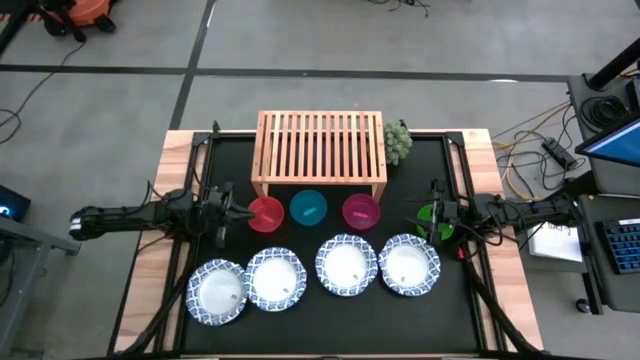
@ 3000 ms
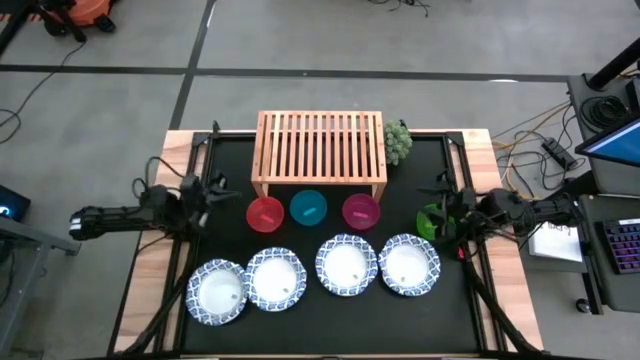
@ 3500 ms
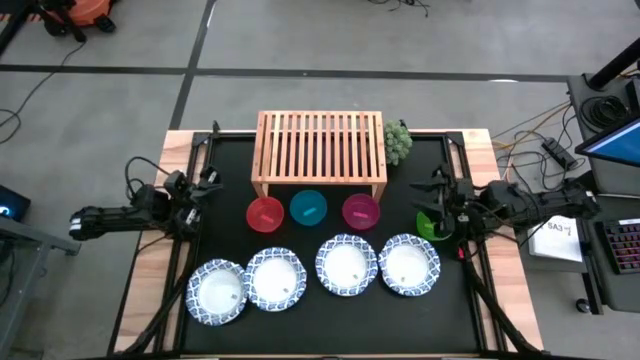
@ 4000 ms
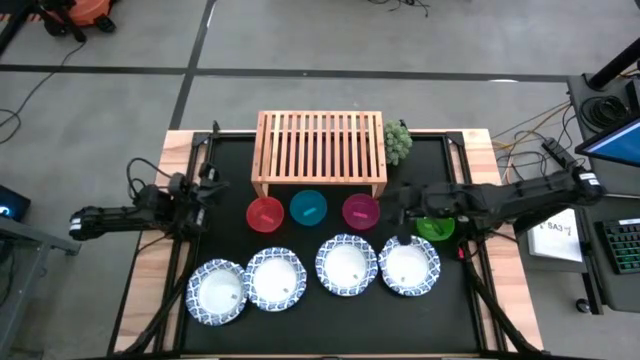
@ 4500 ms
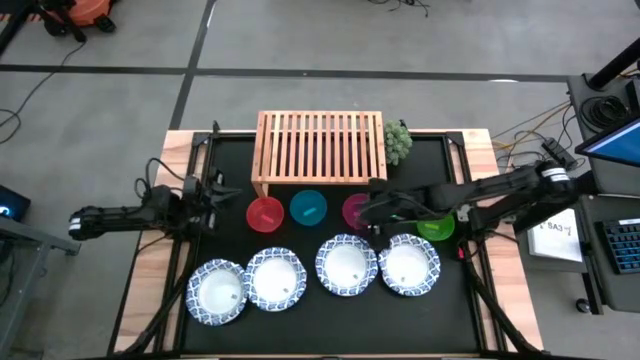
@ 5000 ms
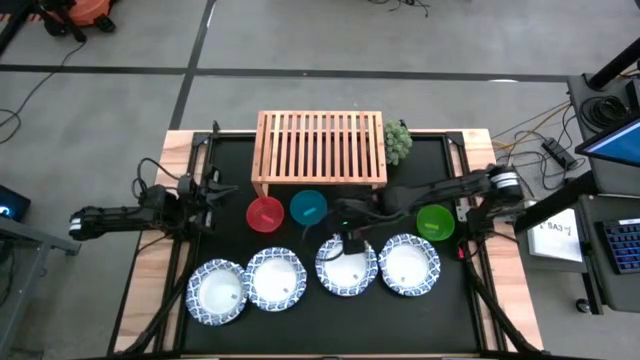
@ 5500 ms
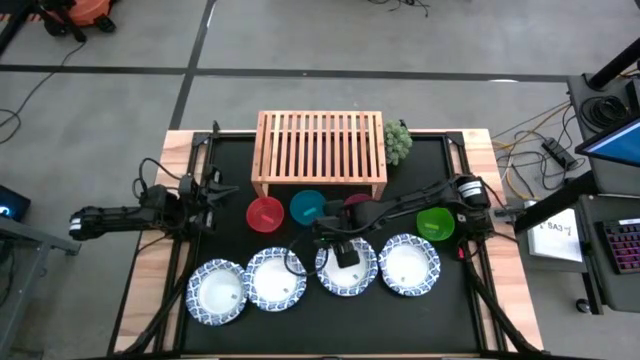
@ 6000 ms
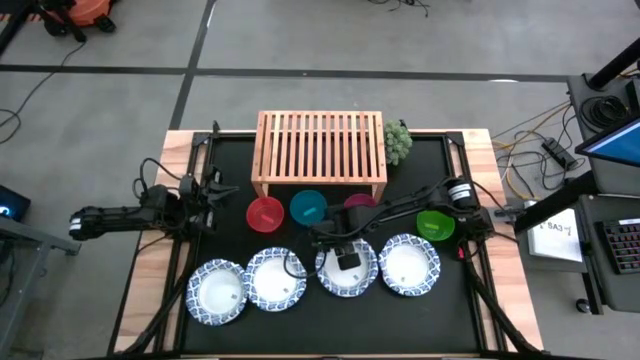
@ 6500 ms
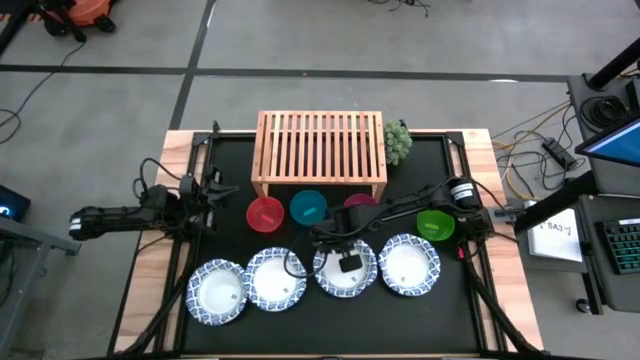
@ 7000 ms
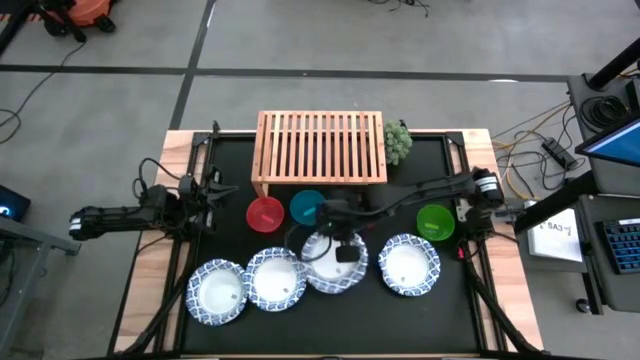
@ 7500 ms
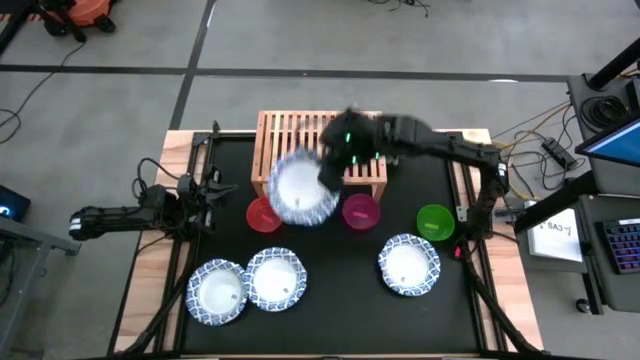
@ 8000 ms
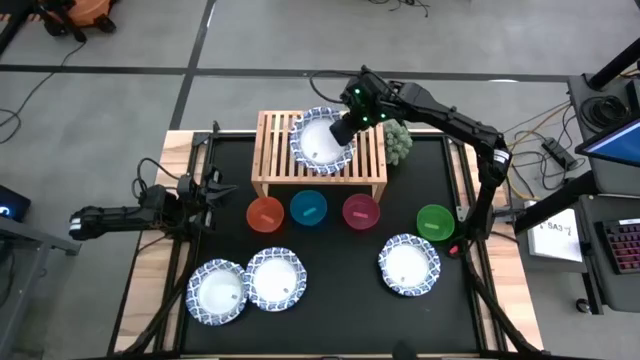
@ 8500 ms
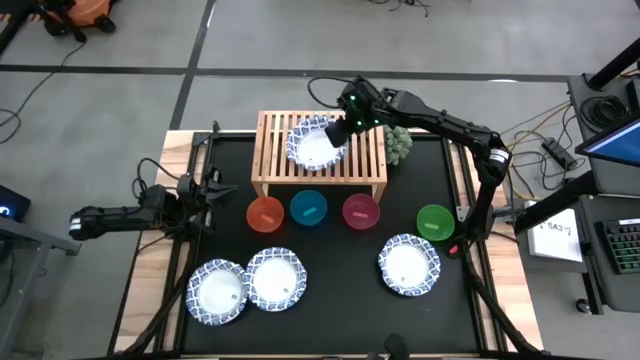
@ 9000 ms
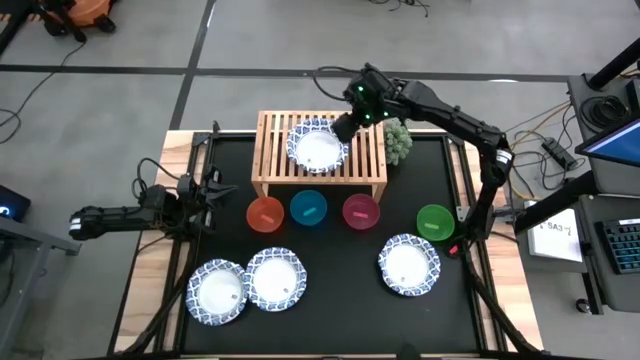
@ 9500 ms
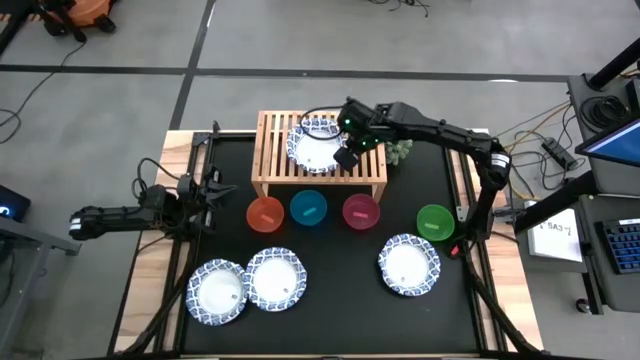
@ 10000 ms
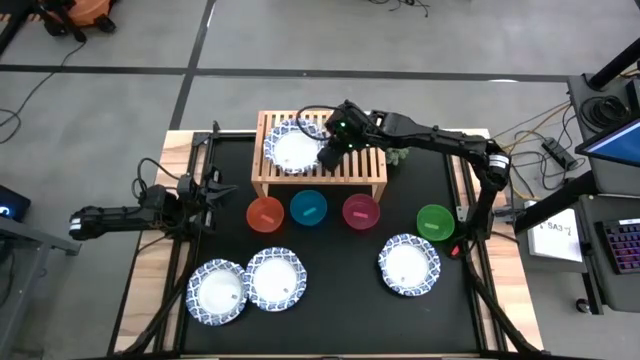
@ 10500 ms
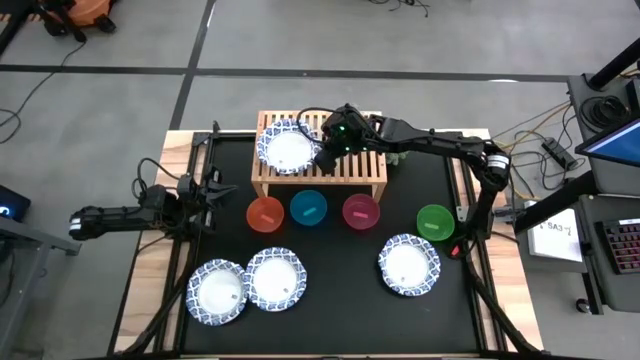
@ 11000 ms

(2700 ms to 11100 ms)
Task: Place and stack bowls onto a shelf
Put the white bowl on the shelf

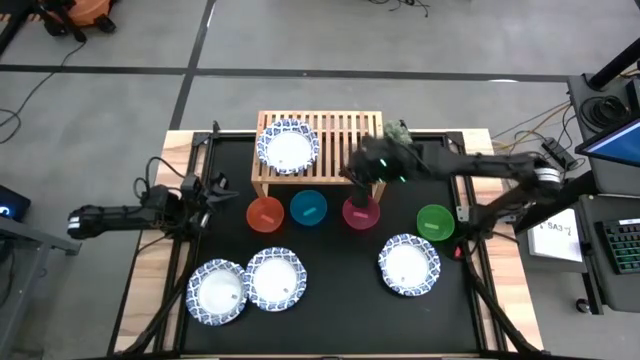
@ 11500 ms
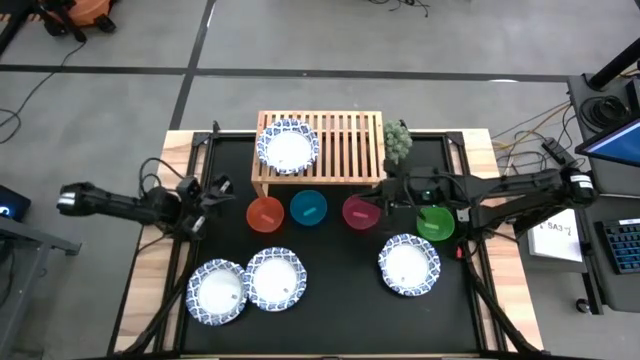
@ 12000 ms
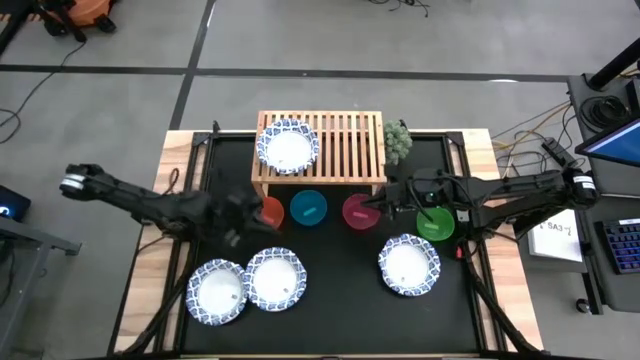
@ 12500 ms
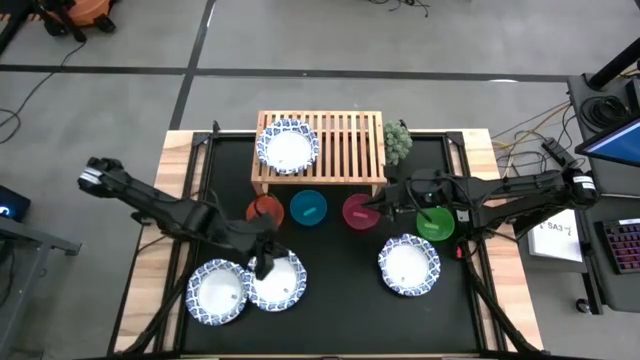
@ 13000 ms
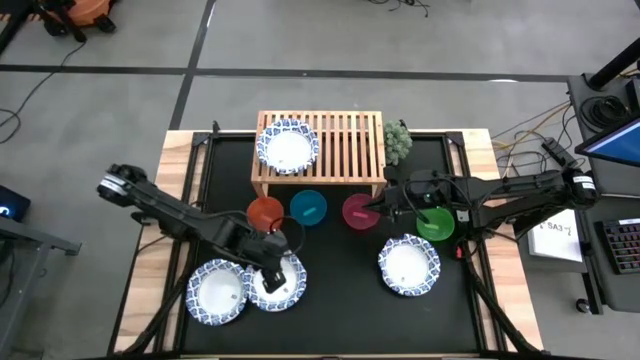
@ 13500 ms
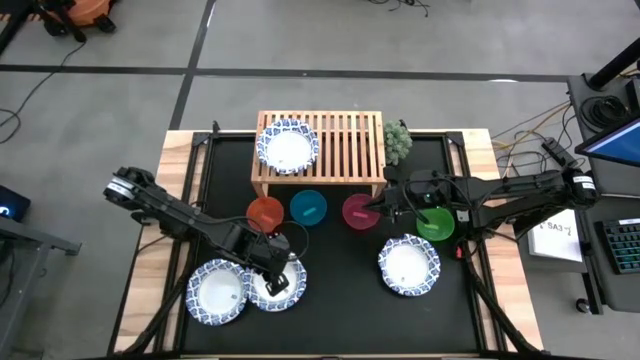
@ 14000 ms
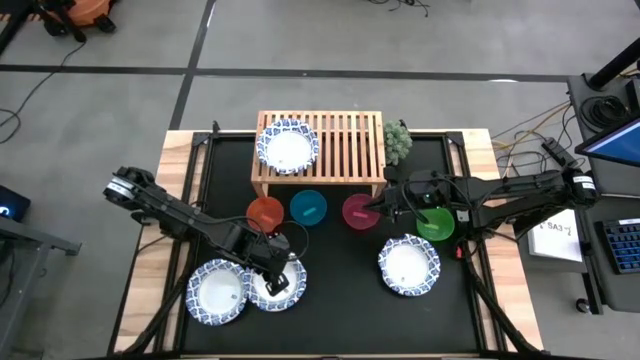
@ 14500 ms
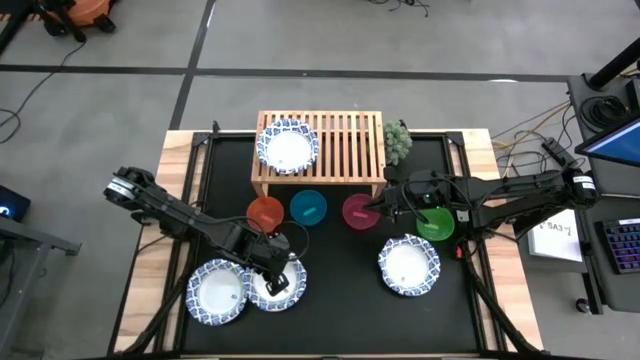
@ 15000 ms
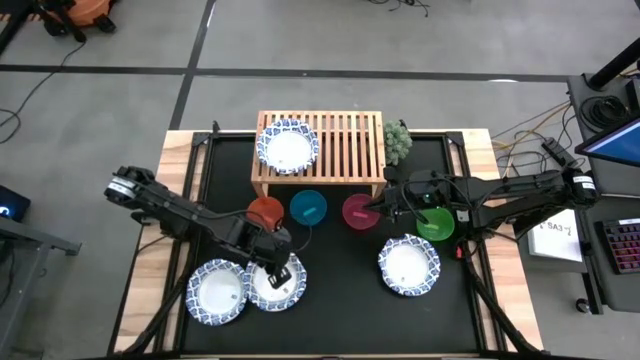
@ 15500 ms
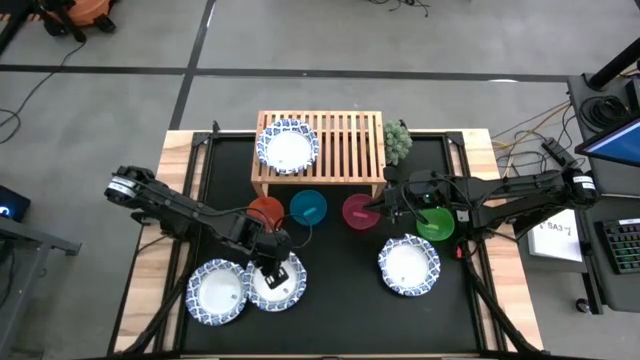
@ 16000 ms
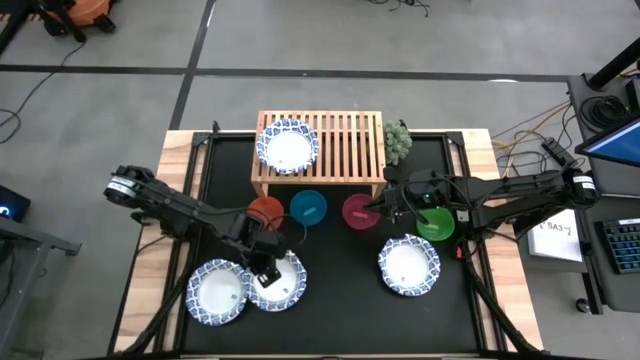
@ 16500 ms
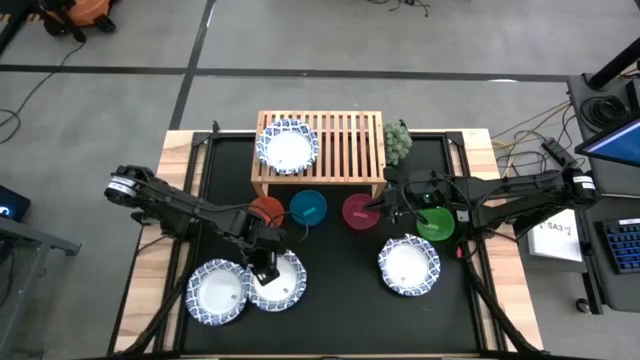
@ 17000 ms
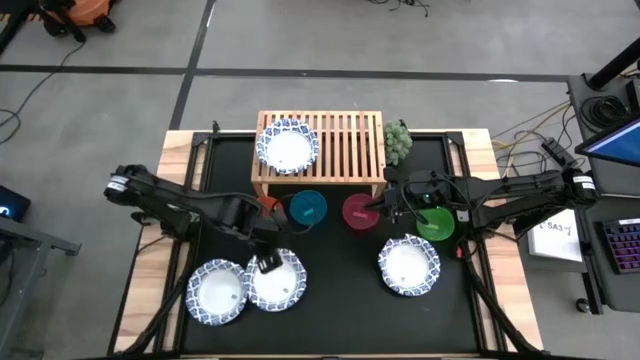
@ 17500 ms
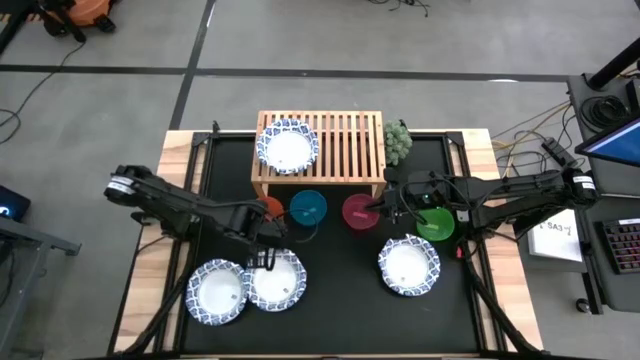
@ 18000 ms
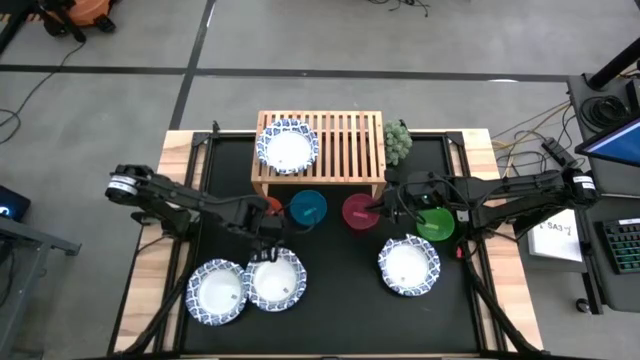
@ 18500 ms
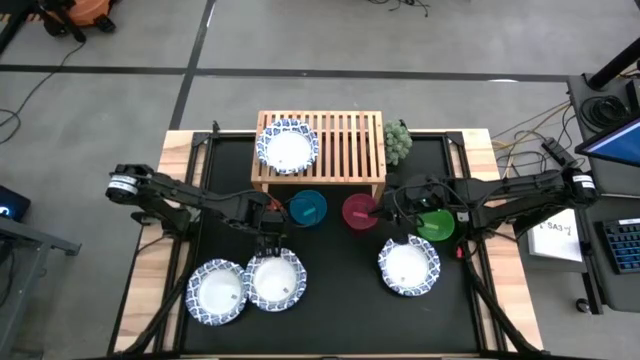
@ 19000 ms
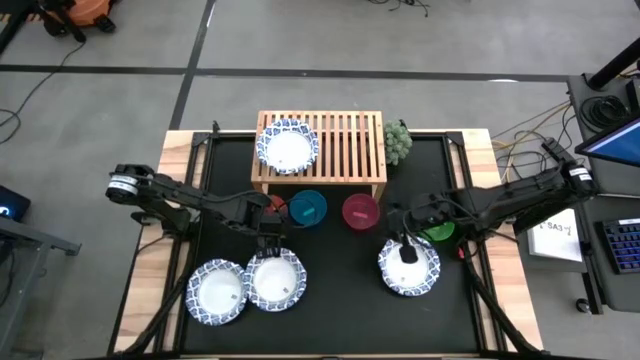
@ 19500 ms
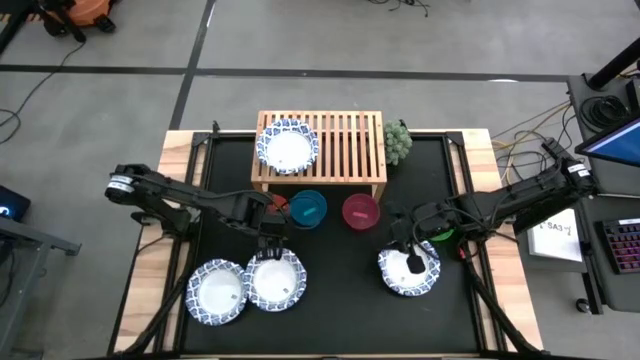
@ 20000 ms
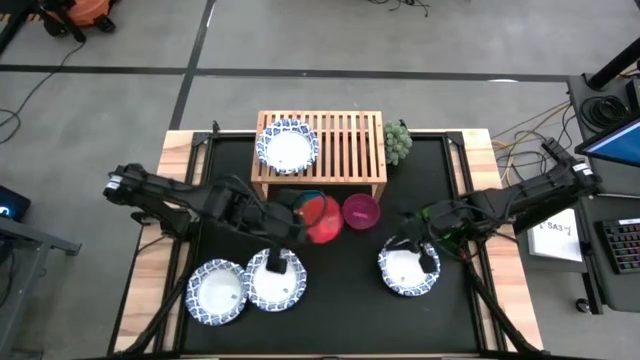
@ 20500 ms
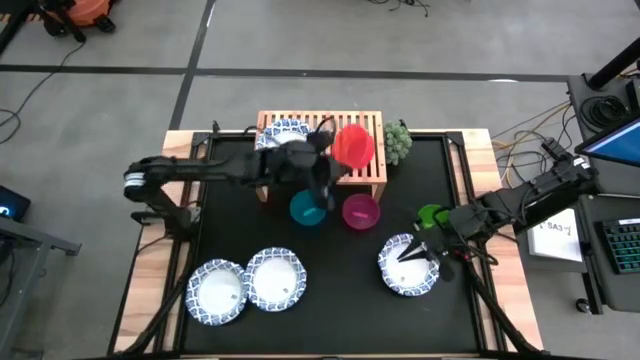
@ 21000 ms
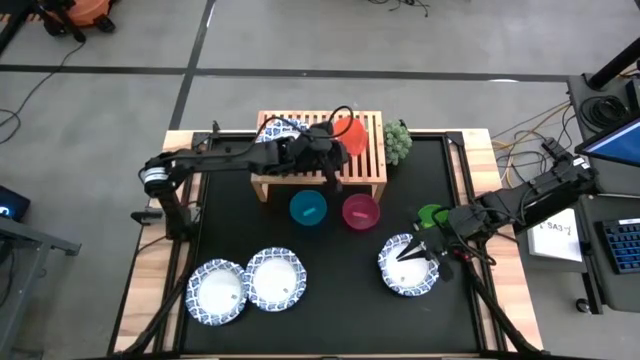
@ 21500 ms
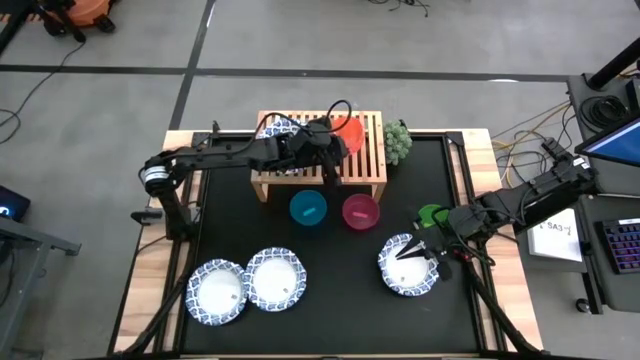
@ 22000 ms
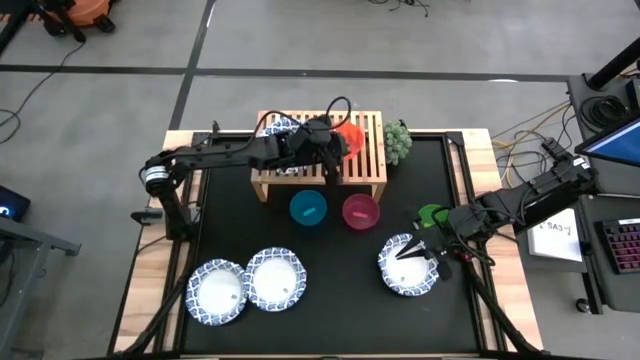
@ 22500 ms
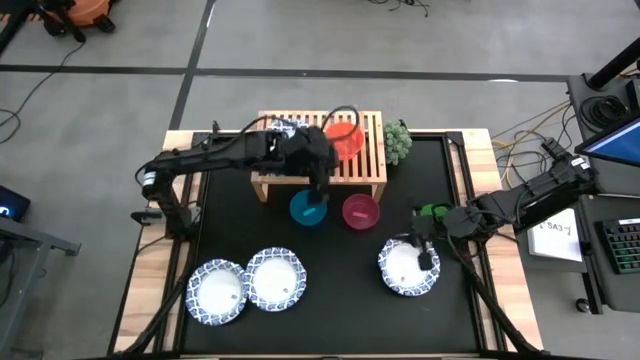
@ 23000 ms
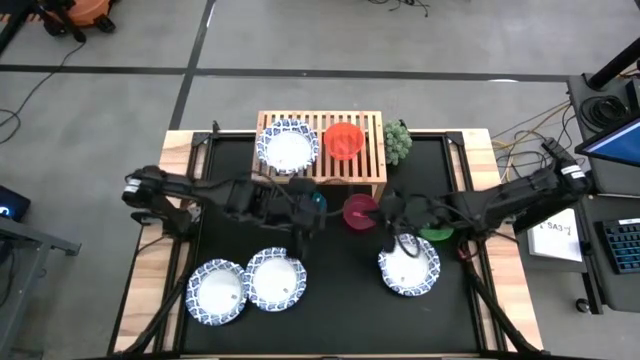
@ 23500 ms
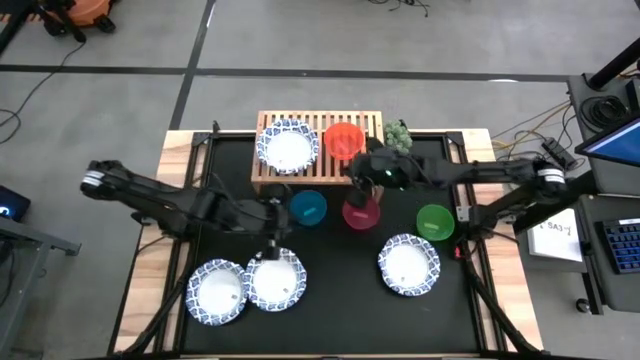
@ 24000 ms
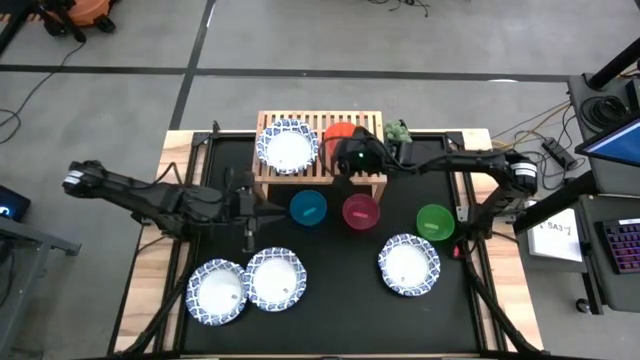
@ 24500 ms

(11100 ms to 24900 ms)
Put the orange bowl on the shelf
